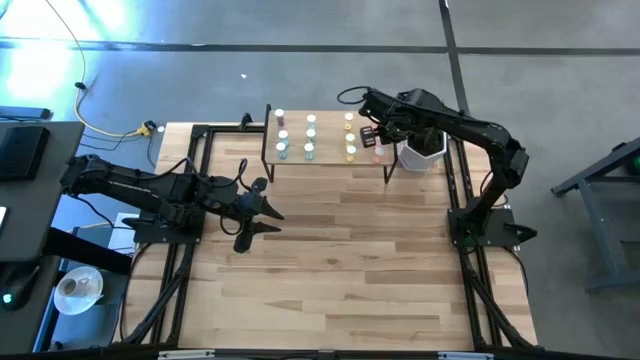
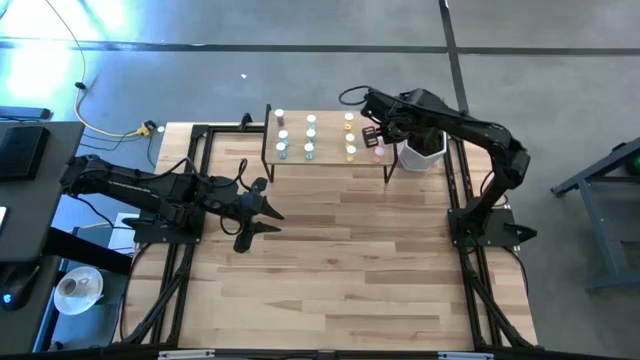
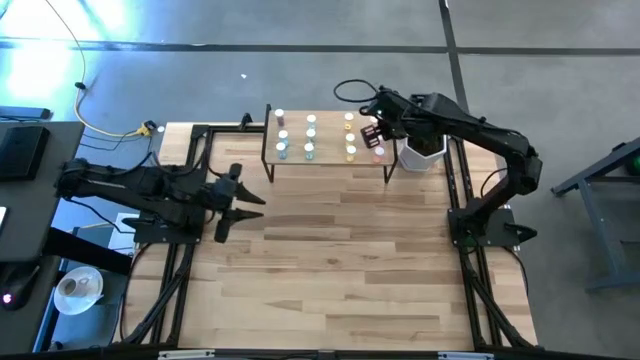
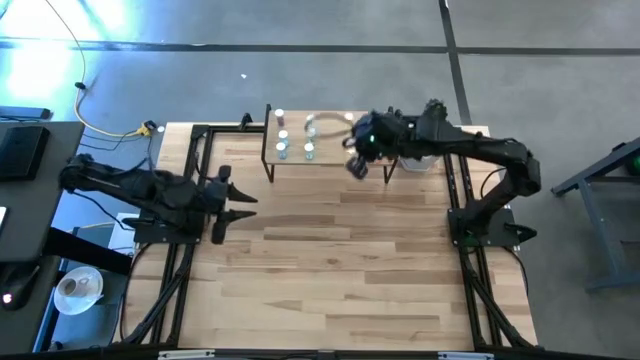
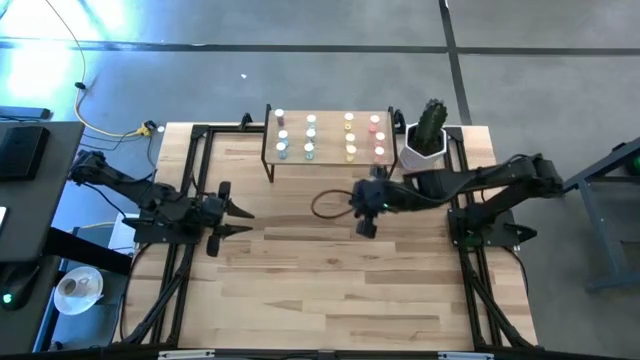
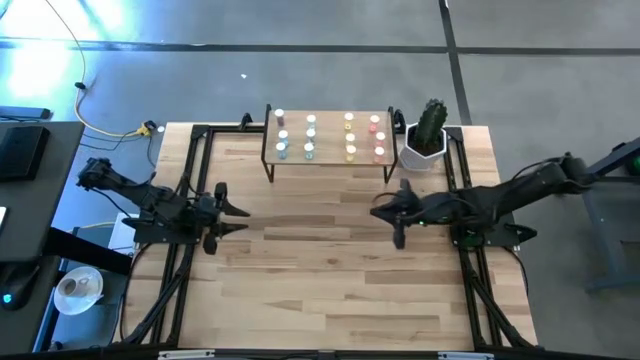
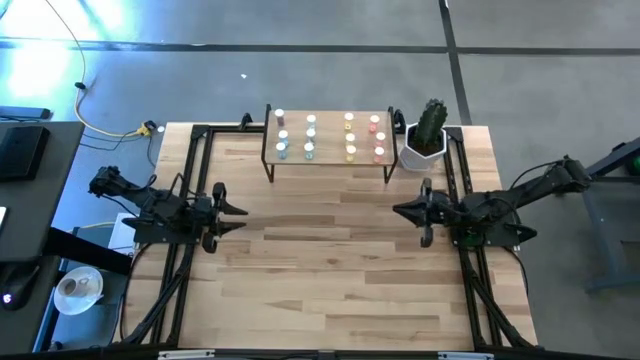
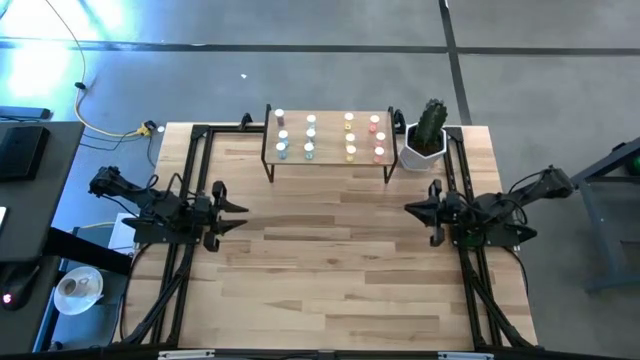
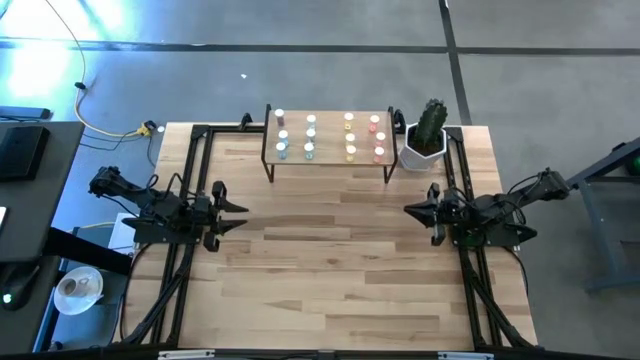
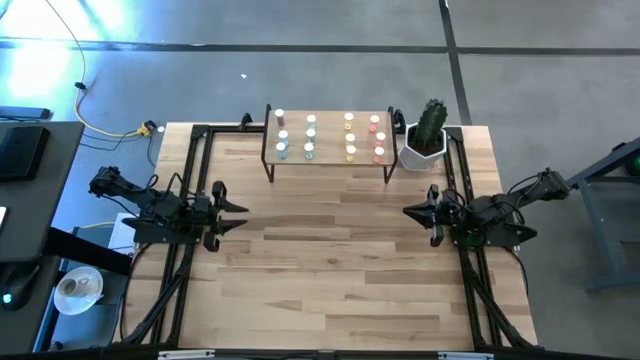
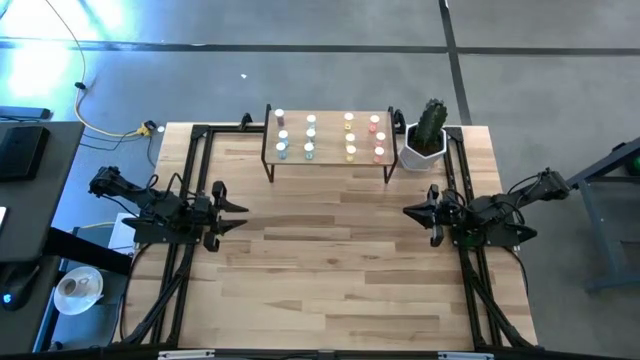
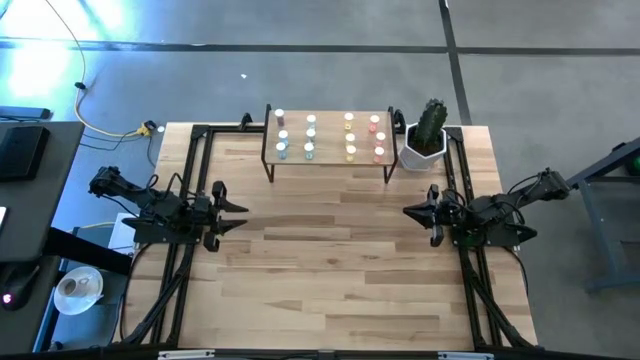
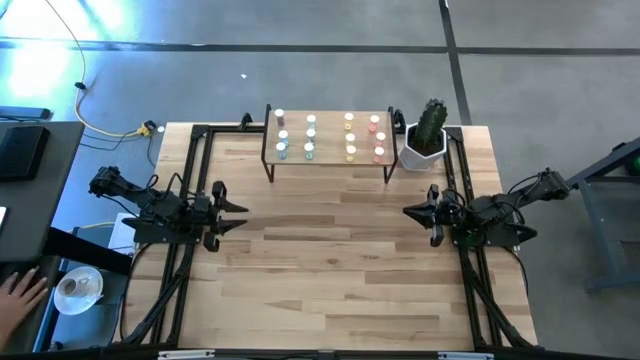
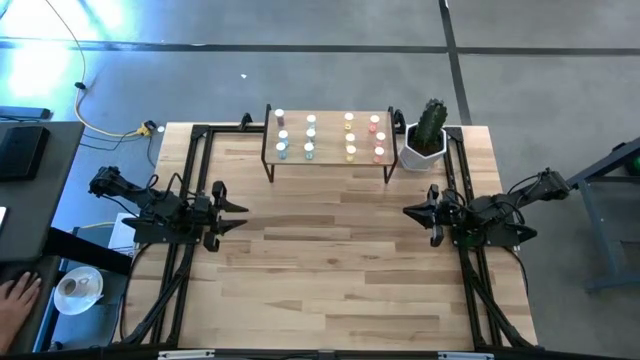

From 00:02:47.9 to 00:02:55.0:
Task: Pick and place medicine bottles onto shelf by color
Return to Home Position

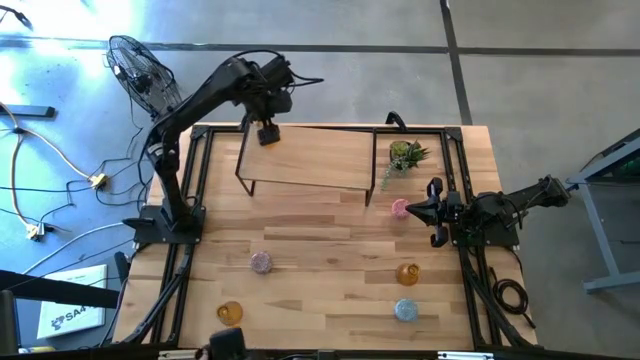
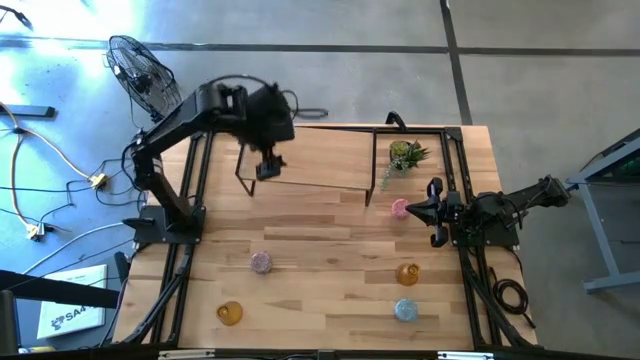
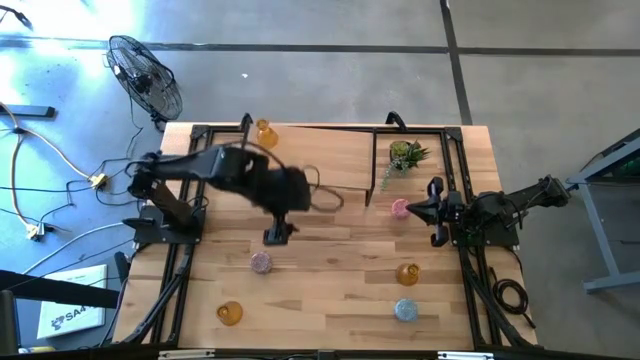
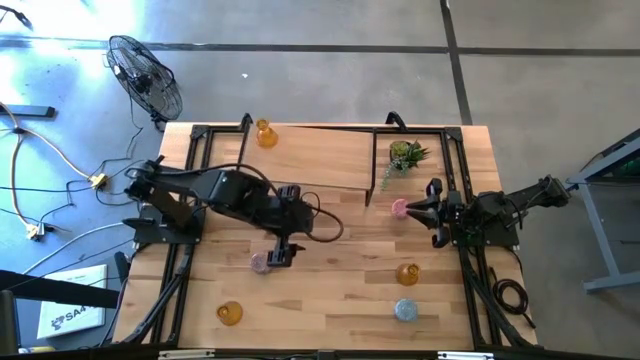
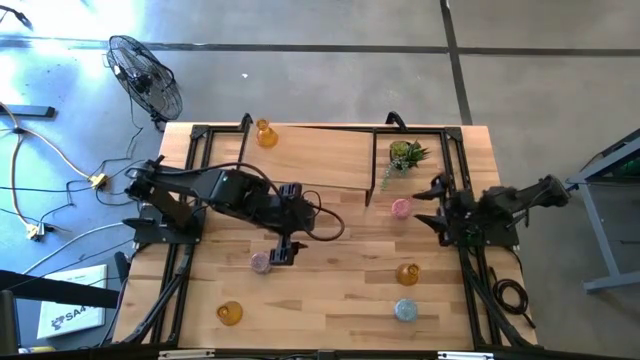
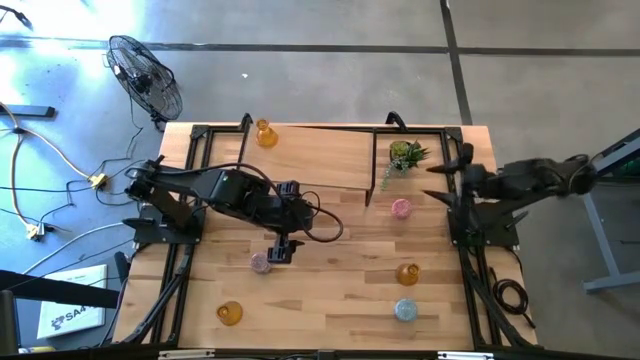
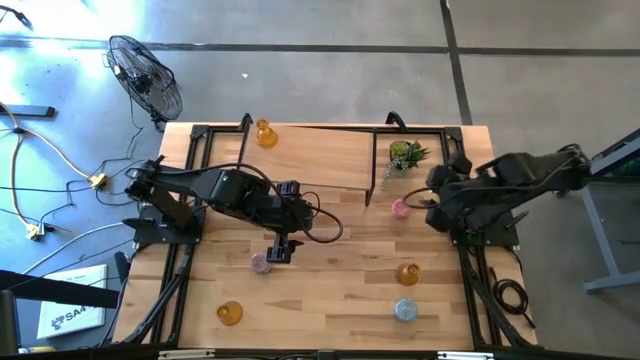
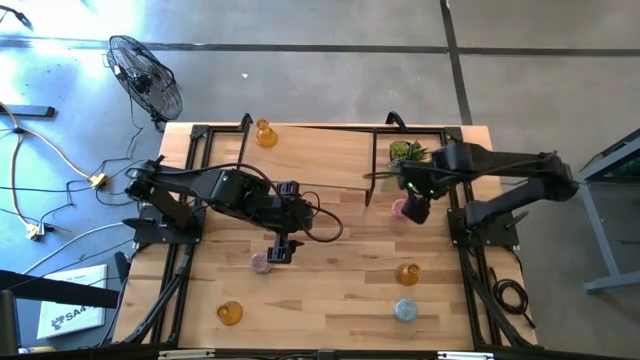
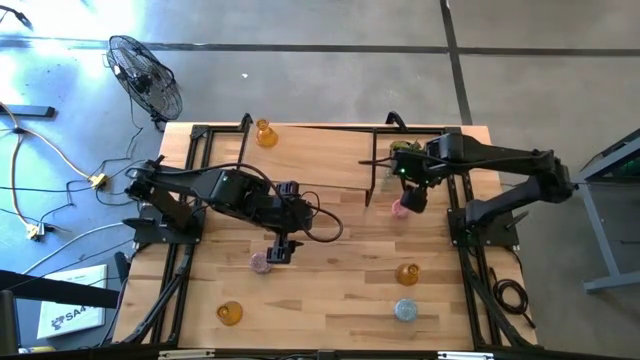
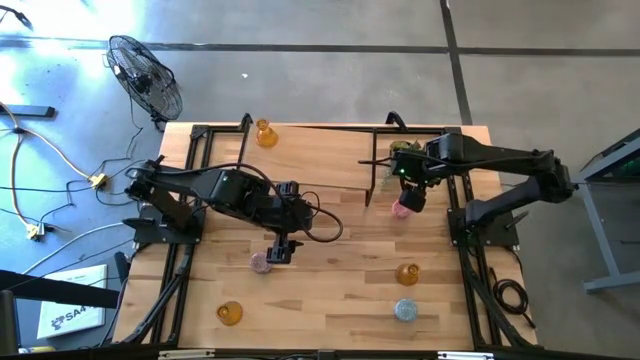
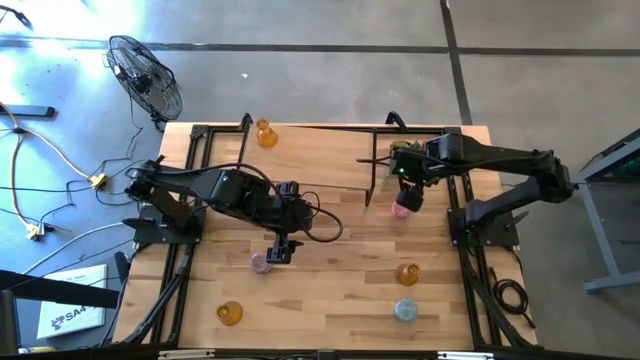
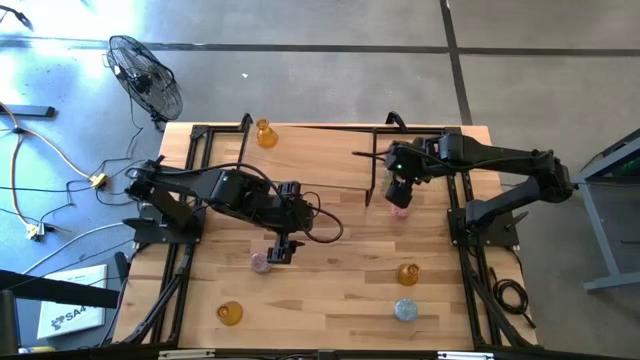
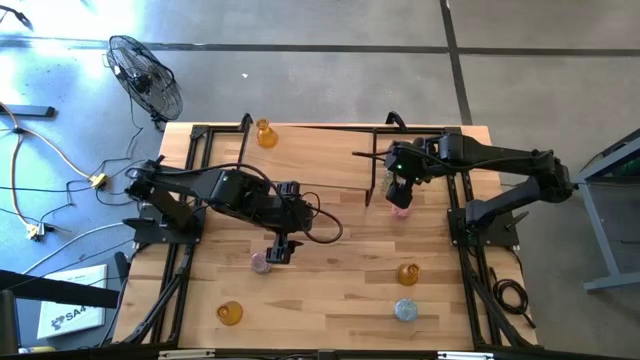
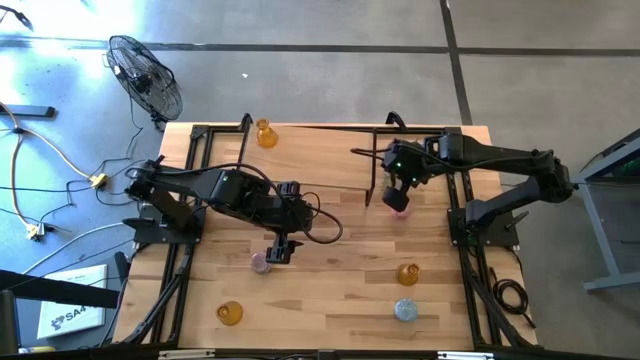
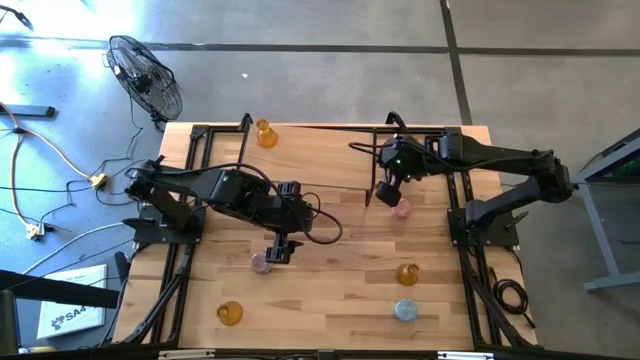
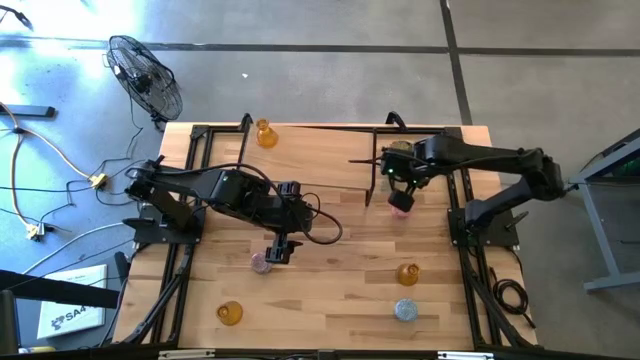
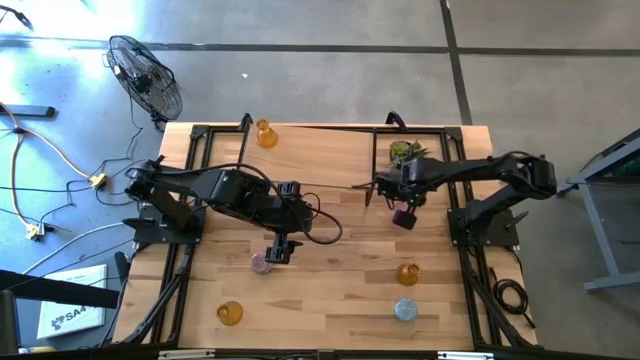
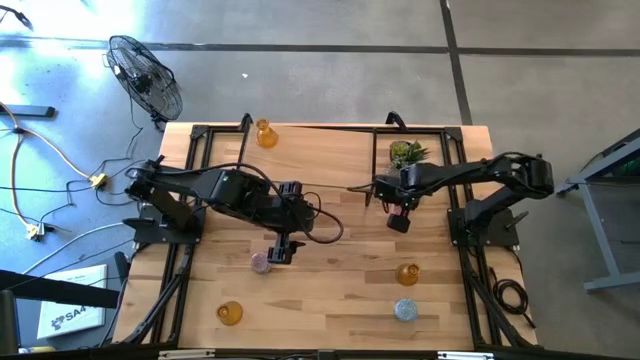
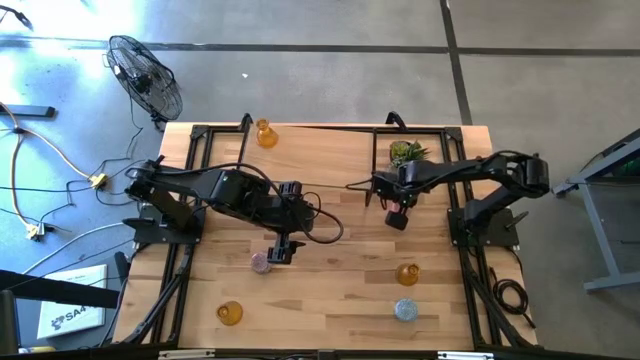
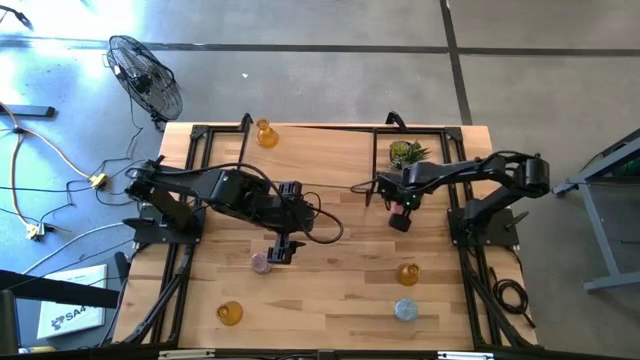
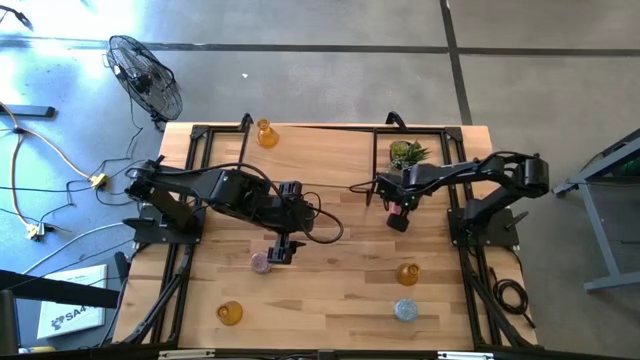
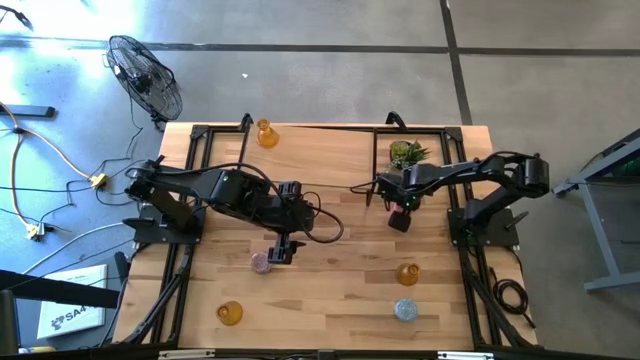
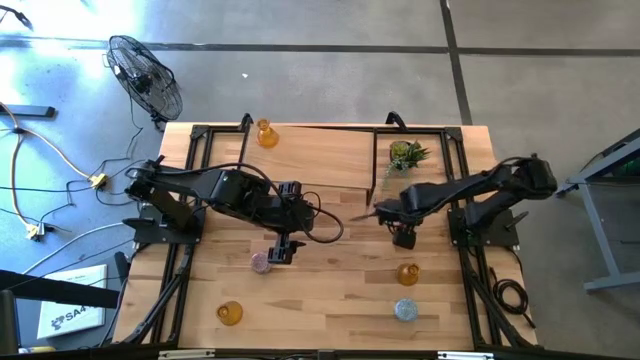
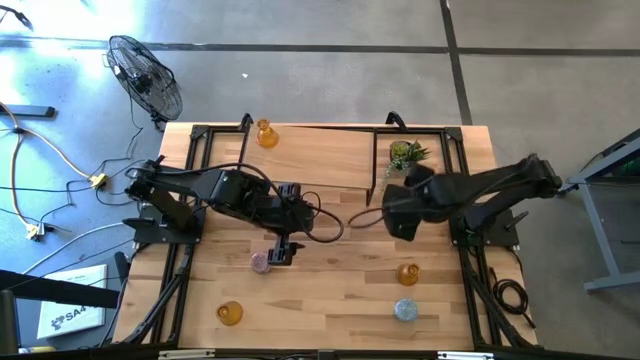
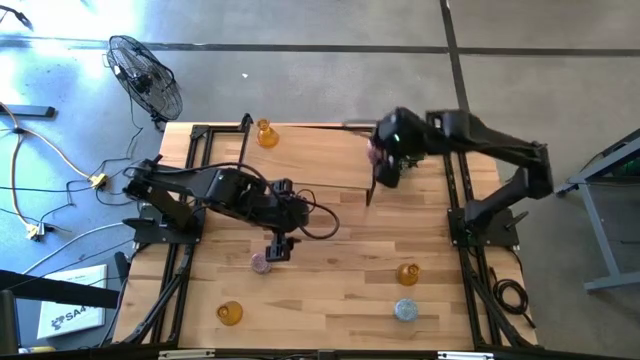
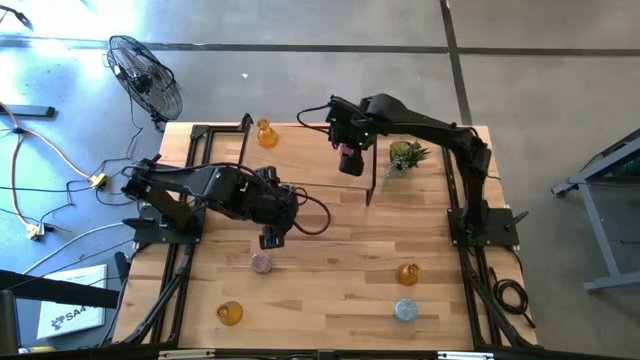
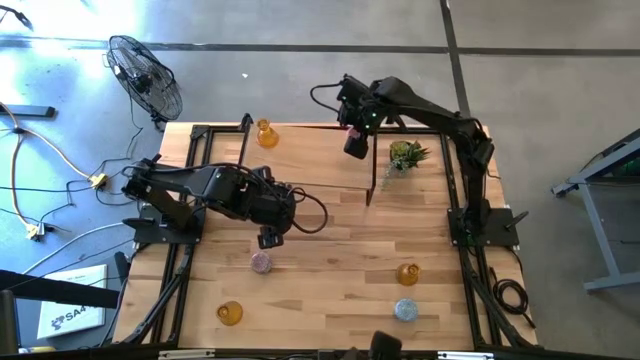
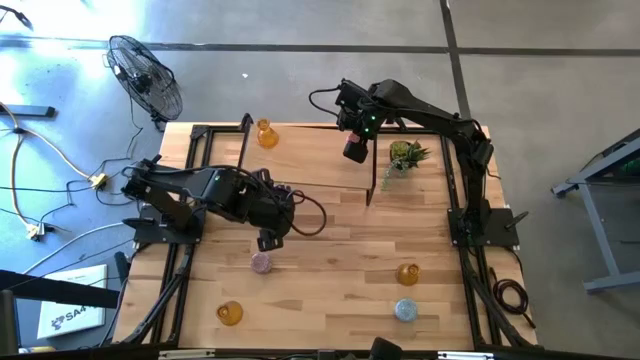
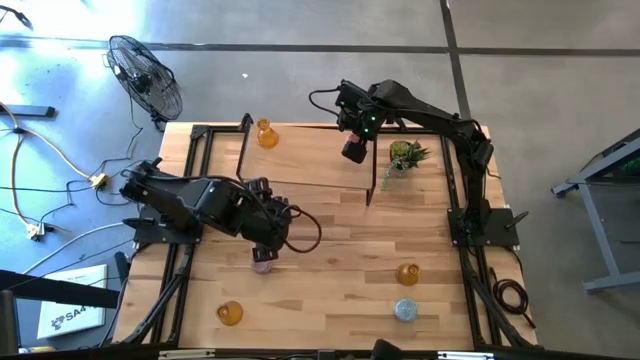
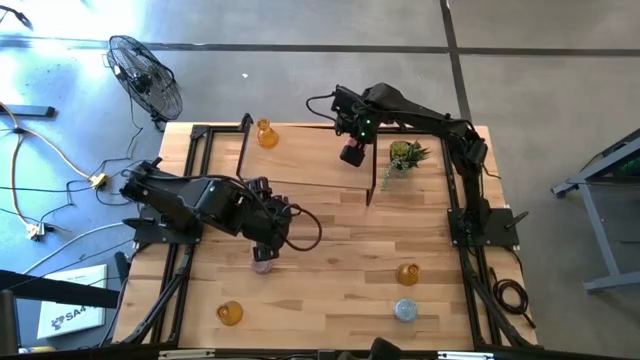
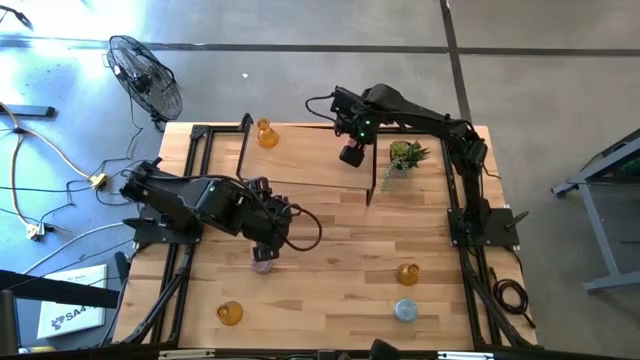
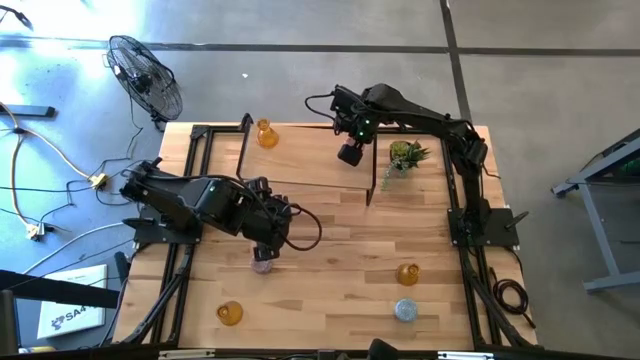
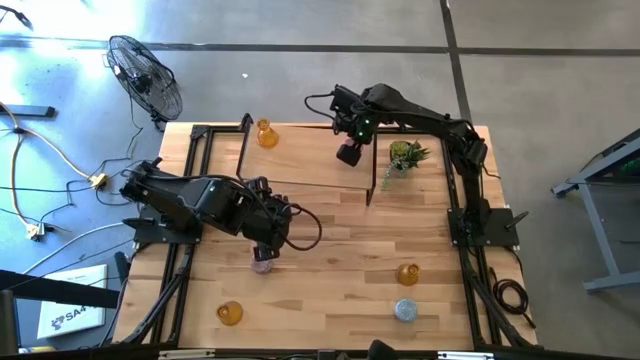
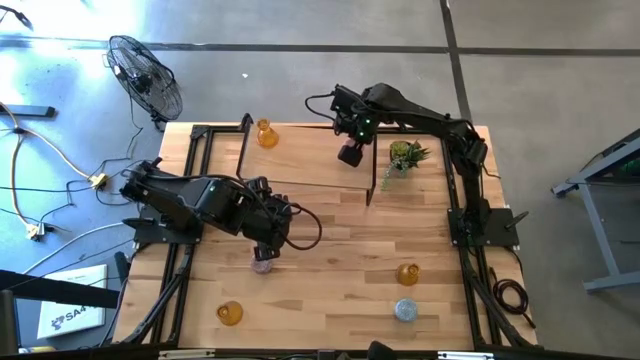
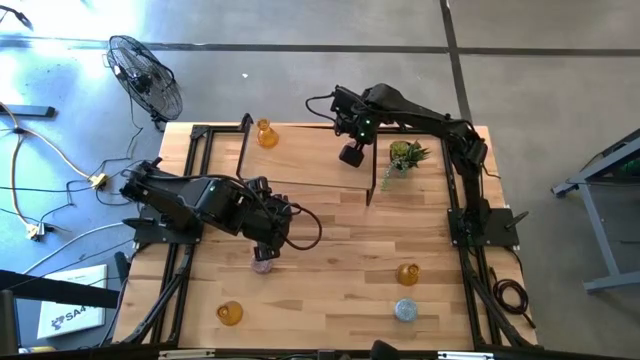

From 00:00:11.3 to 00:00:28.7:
Task: Pick & Place candle stick holders
Put the pink scented candle on the shelf
